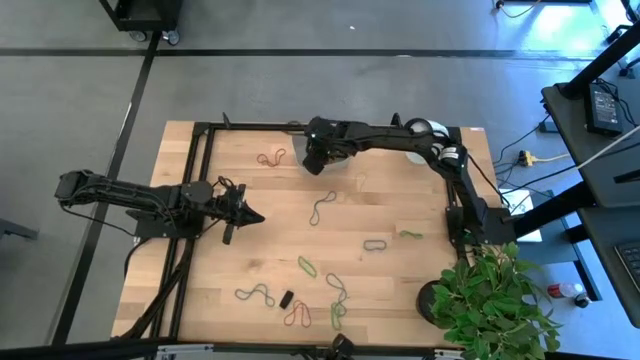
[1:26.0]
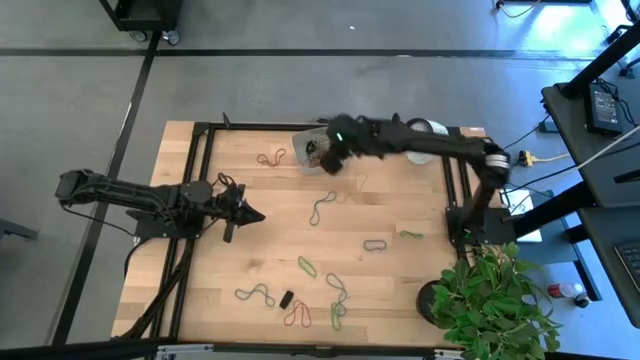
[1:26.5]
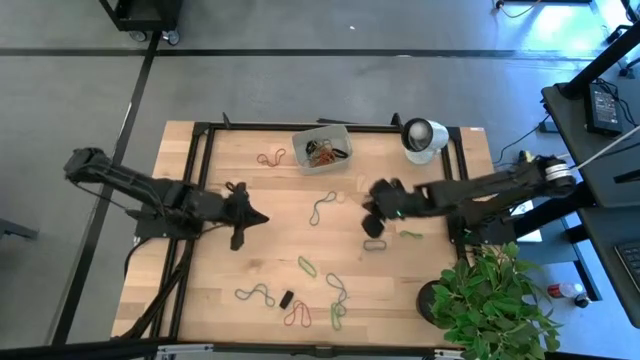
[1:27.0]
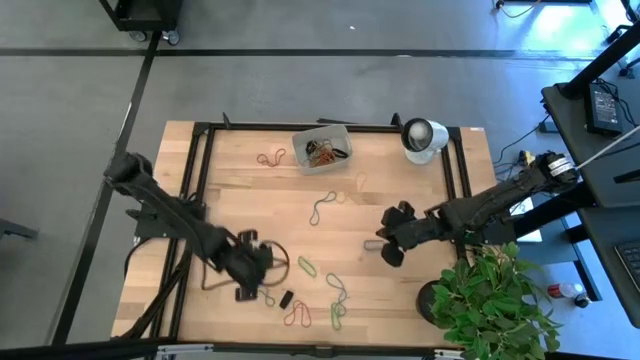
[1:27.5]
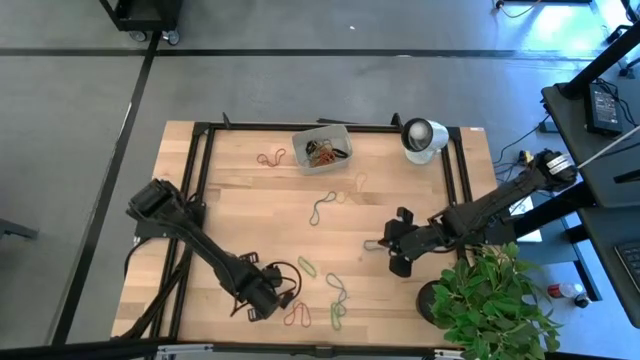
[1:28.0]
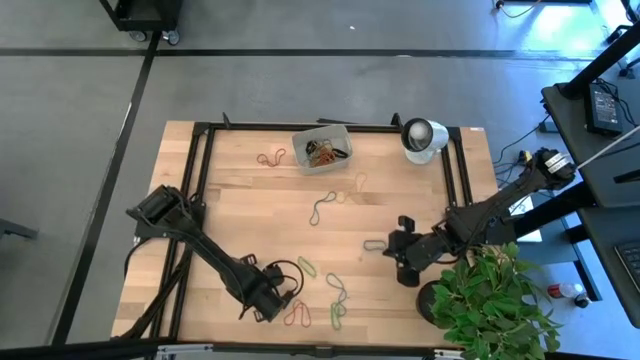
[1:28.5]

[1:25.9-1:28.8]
Task: Pick and place rubber bands into bin
Put the blue rubber band into the gray bin

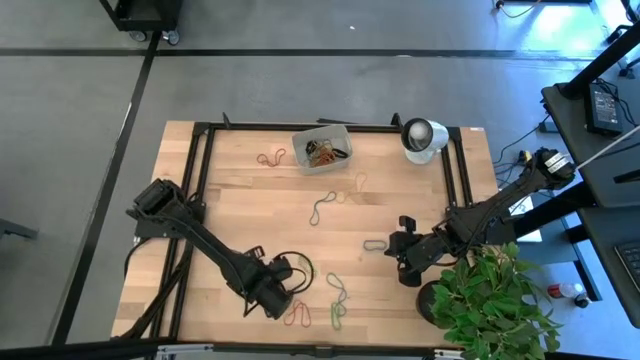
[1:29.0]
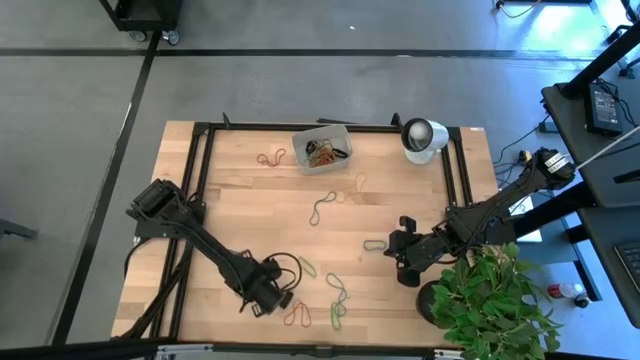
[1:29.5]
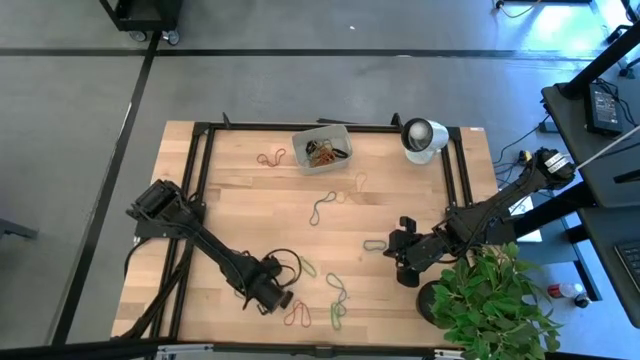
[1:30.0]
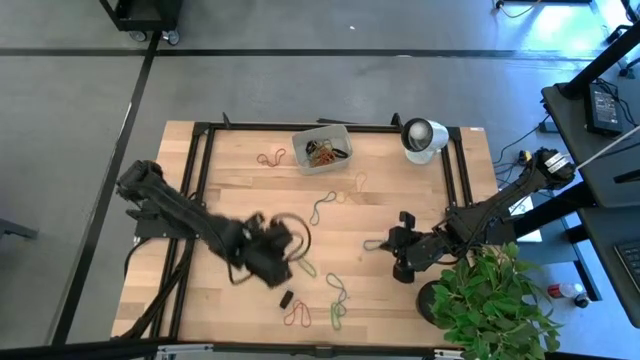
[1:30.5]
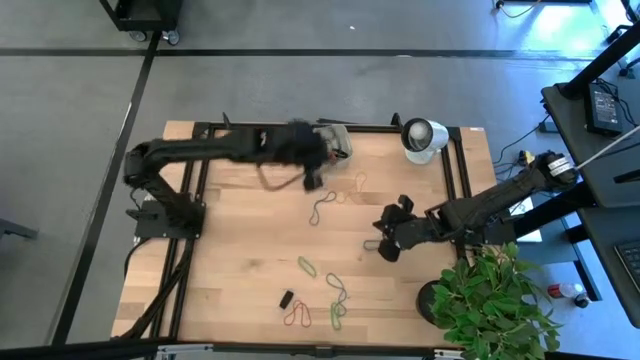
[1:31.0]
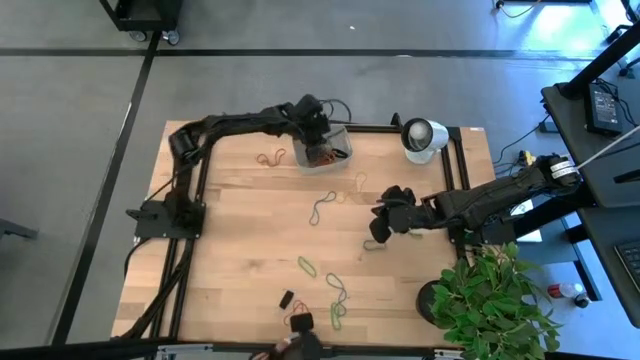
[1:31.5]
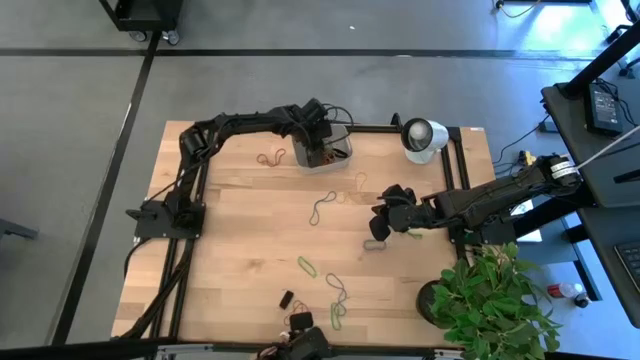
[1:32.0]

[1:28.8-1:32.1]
Put the blue rubber band into the gray bin

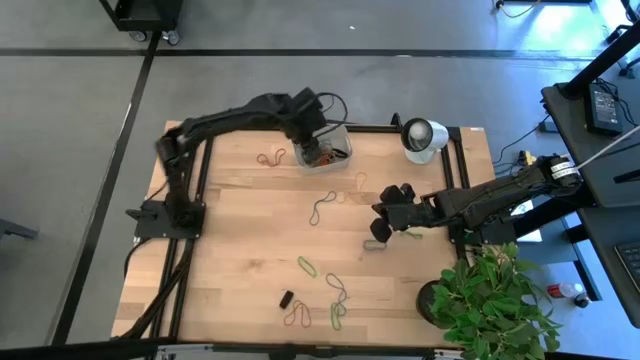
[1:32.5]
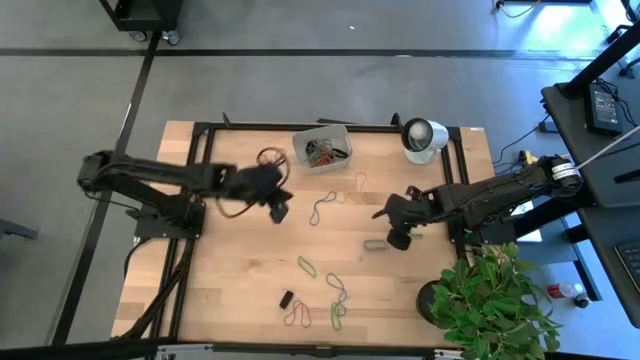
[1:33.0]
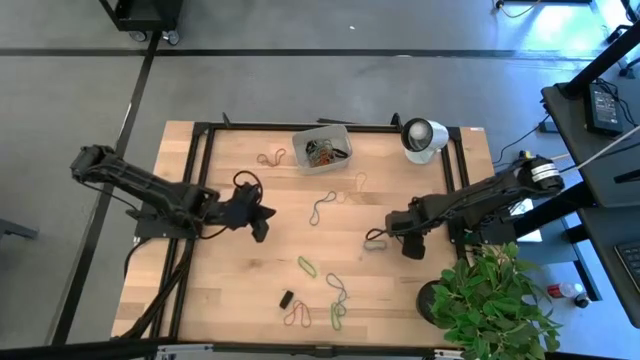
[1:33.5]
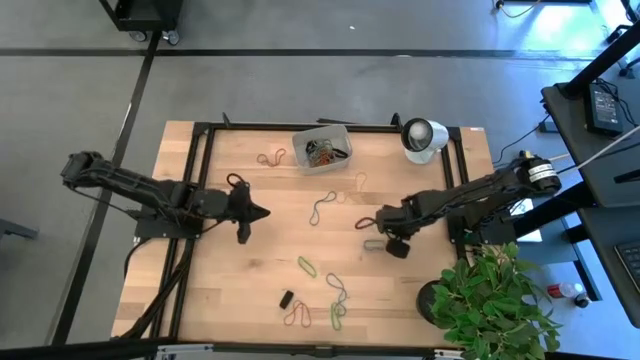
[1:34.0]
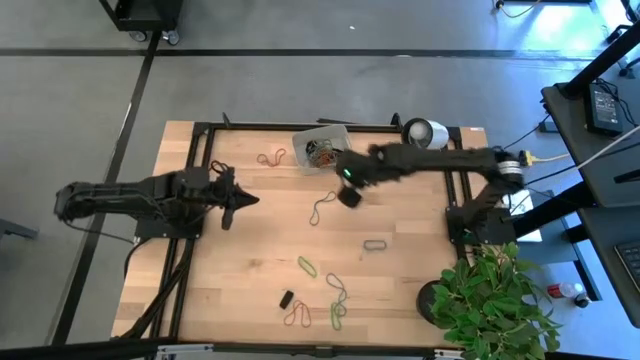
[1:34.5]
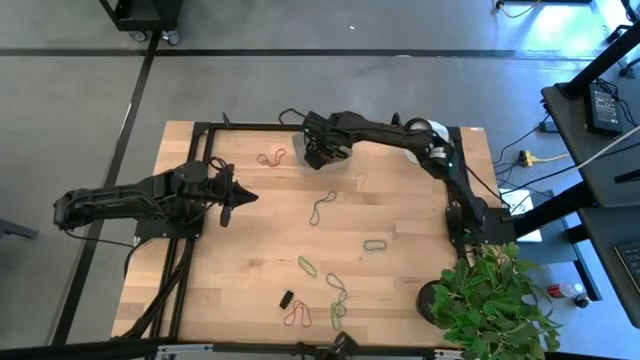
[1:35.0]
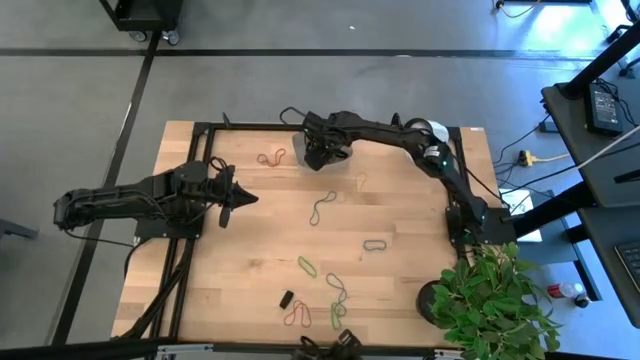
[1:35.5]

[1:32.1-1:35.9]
Put the top green rubber band into the gray bin

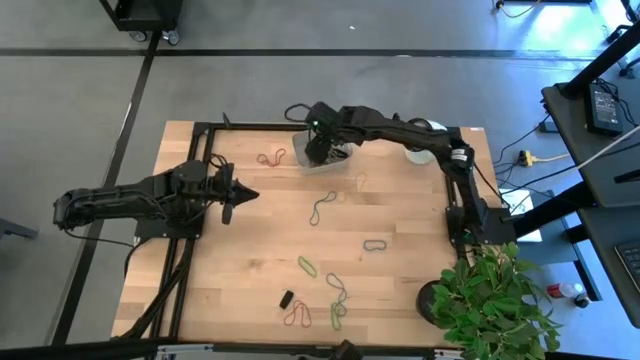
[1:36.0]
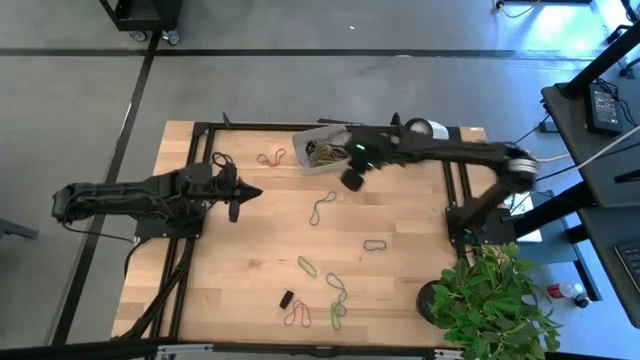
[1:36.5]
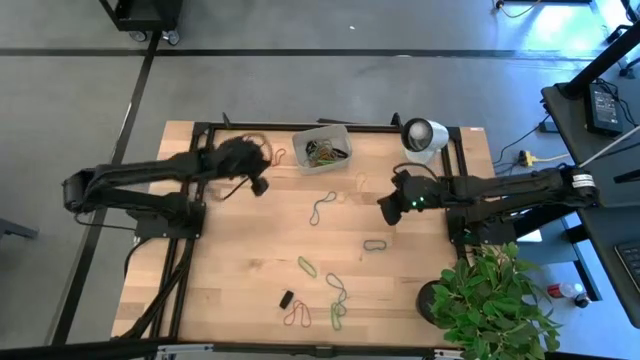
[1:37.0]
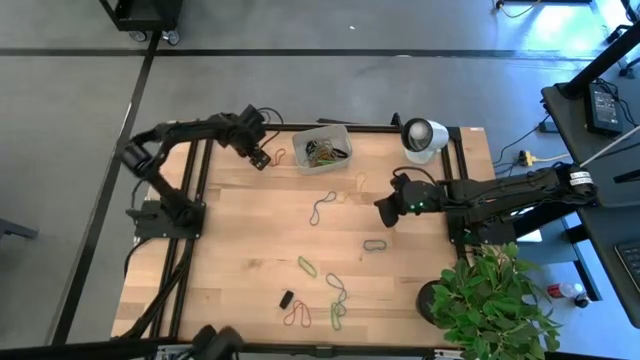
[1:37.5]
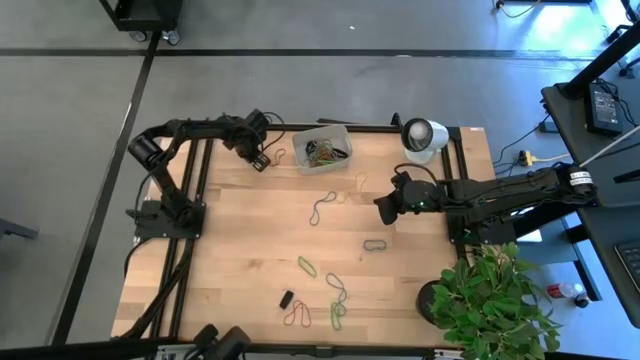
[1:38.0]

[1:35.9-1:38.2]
Put the top red rubber band into the gray bin

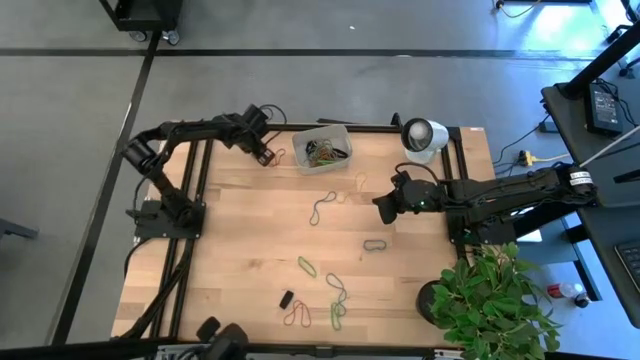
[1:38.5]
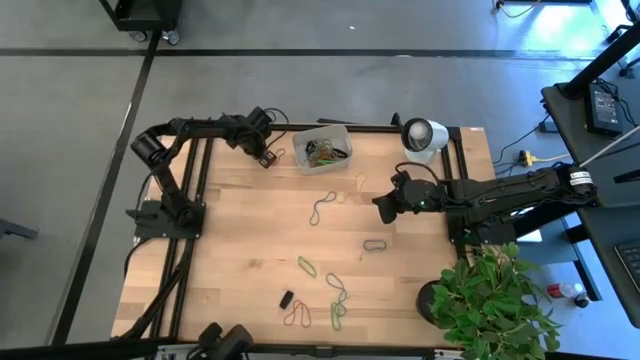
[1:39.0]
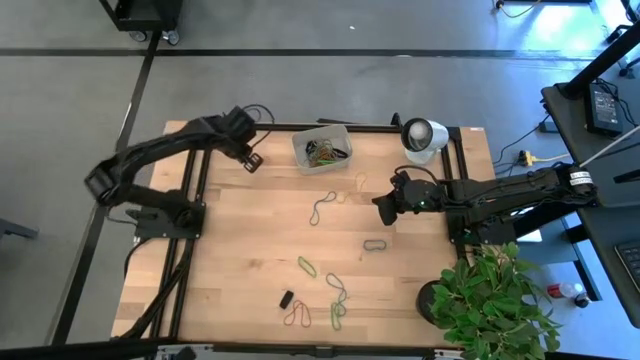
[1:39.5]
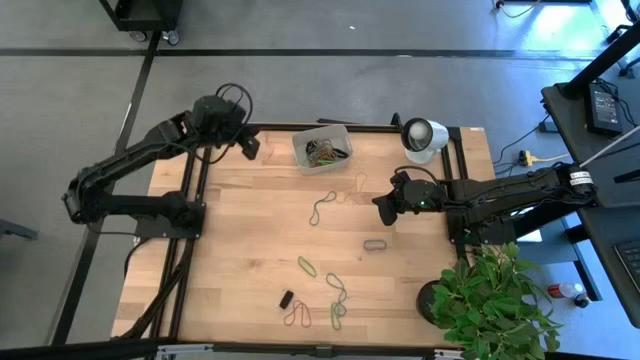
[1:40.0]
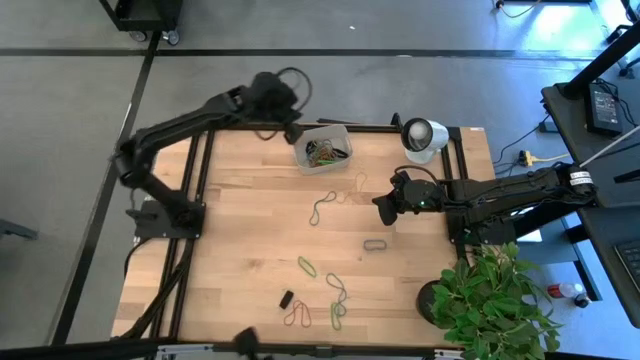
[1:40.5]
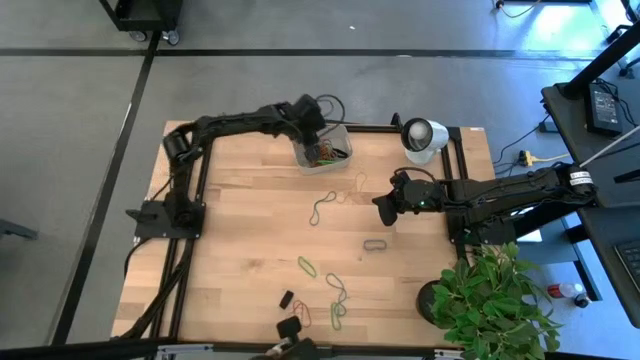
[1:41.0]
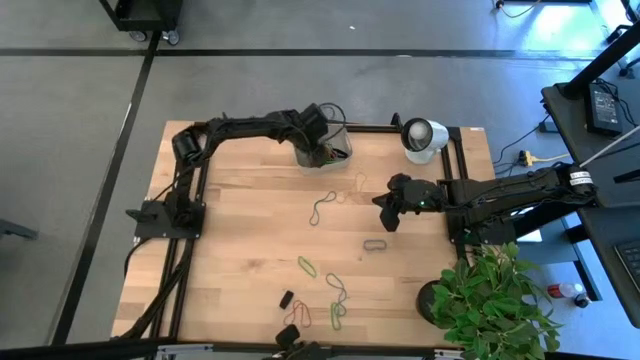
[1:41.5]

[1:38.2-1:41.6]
Put the top red rubber band into the gray bin

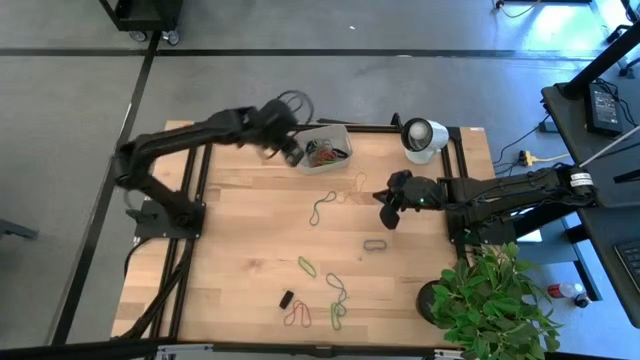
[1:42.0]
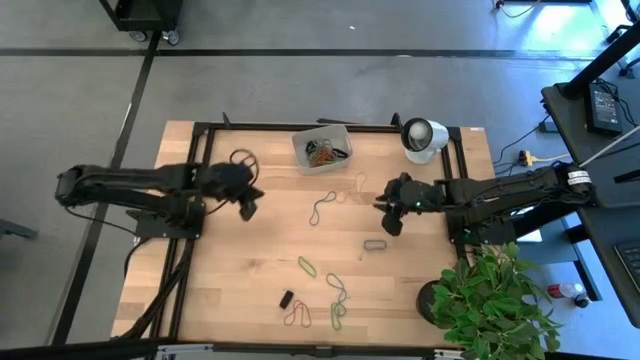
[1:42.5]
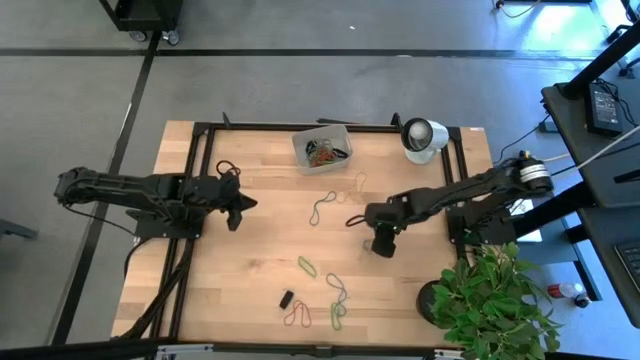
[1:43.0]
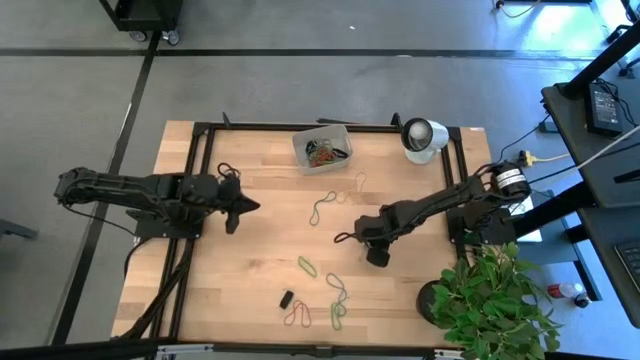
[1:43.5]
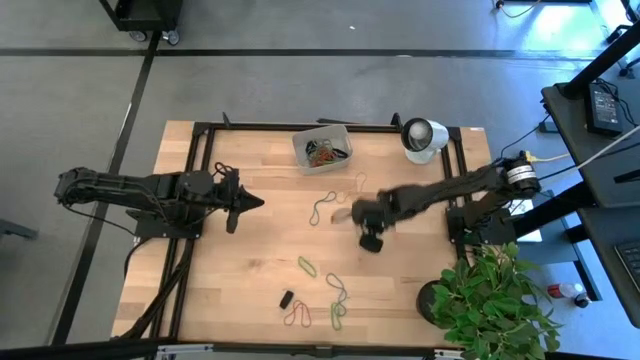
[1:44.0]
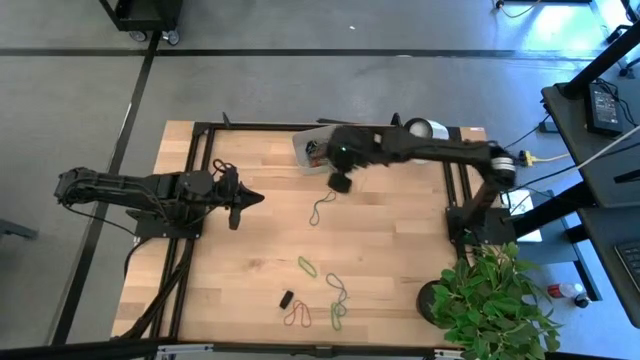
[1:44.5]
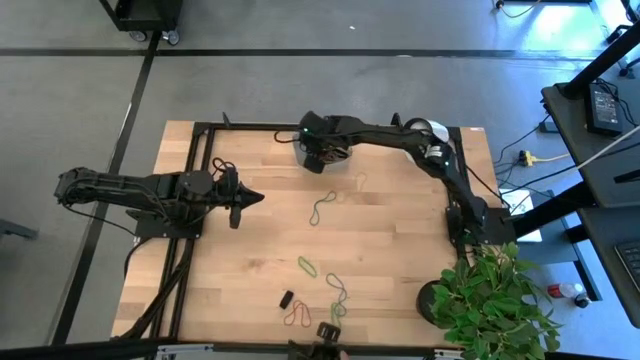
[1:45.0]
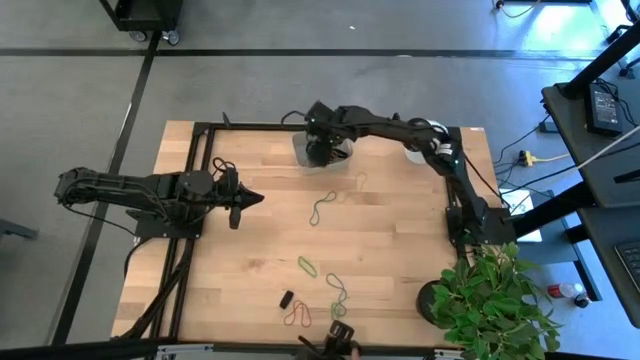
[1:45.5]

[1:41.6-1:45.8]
Put the middle blue rubber band into the gray bin

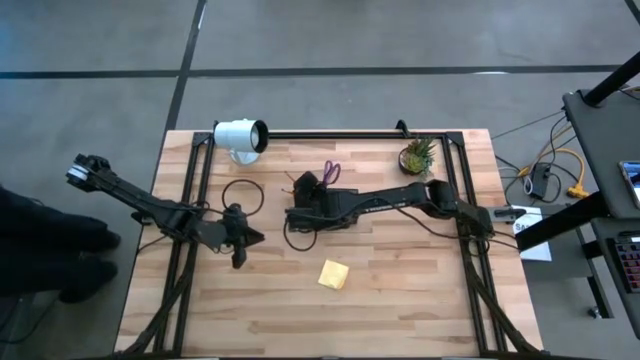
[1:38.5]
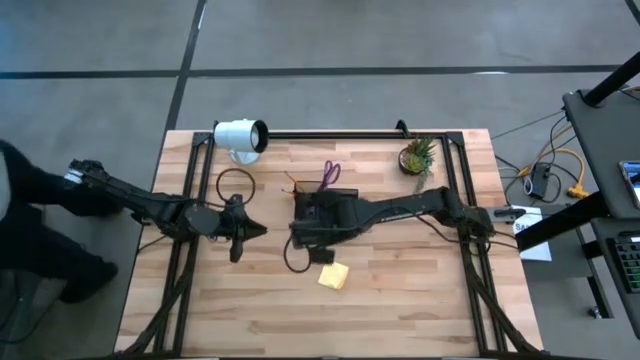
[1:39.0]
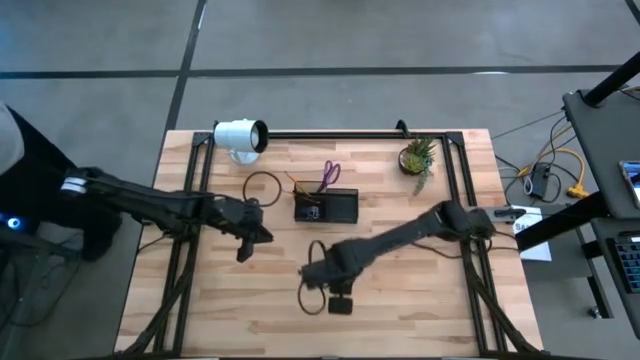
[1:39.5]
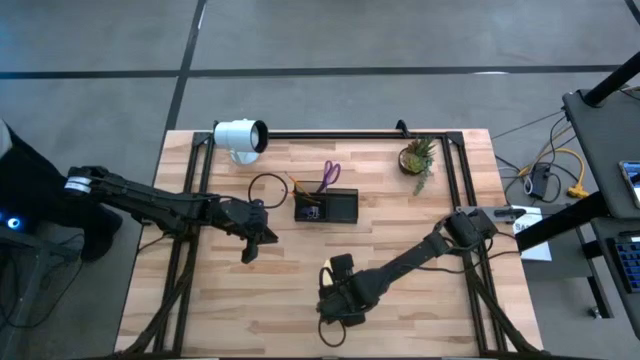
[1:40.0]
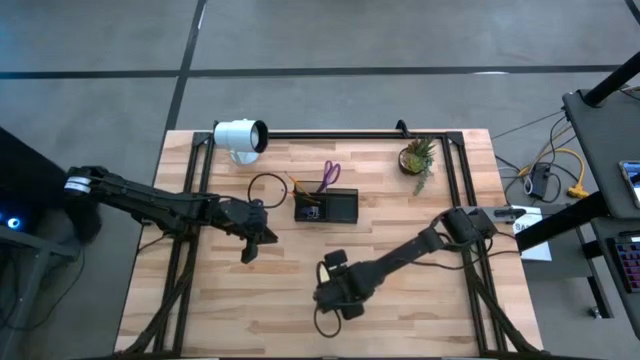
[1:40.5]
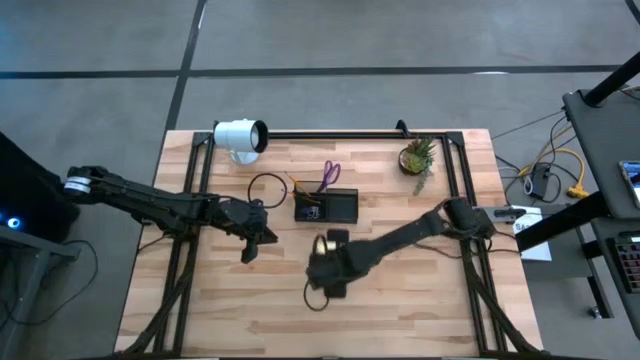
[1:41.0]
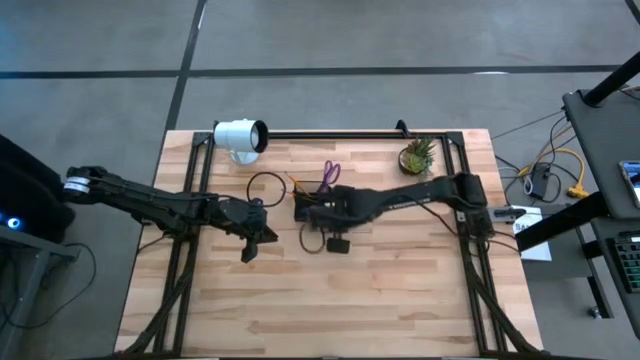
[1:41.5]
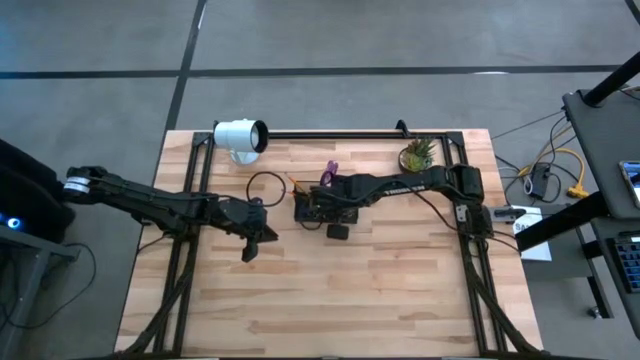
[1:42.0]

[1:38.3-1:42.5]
Task: Pick and place office supplies into organizer
Put the yellow sticky notes into the black desk organizer
